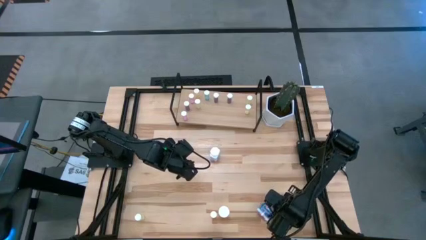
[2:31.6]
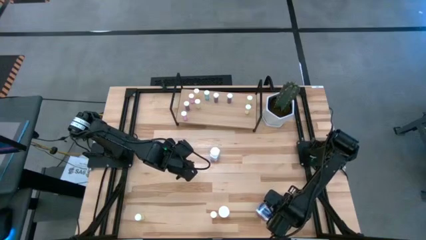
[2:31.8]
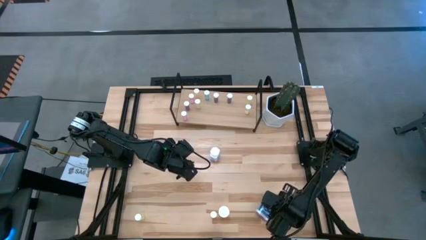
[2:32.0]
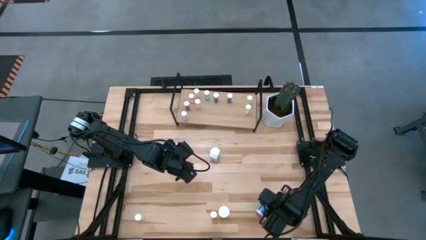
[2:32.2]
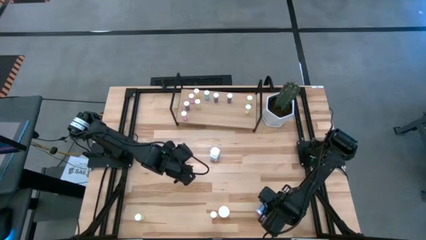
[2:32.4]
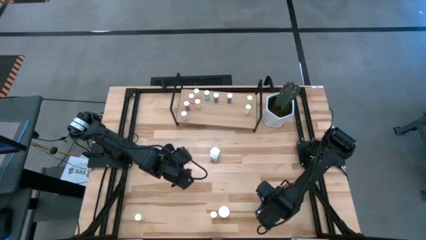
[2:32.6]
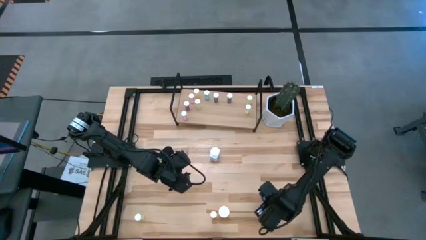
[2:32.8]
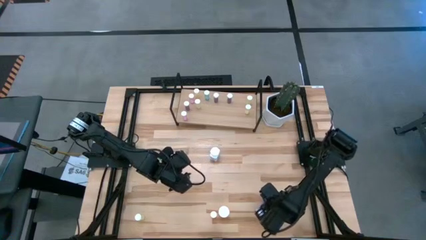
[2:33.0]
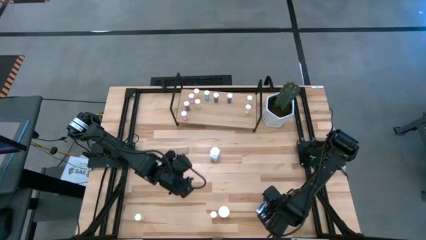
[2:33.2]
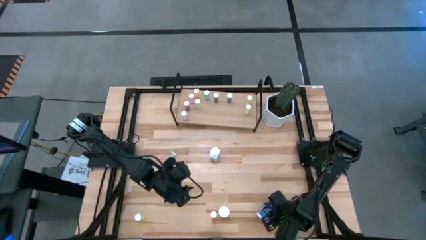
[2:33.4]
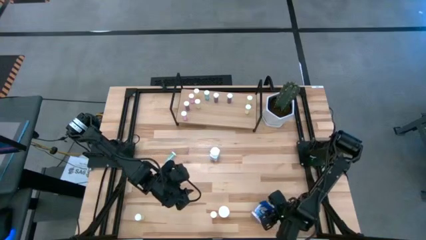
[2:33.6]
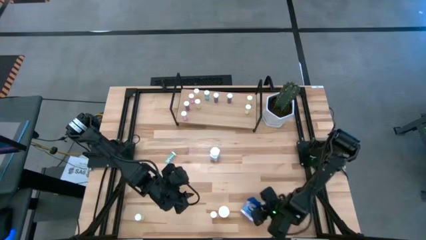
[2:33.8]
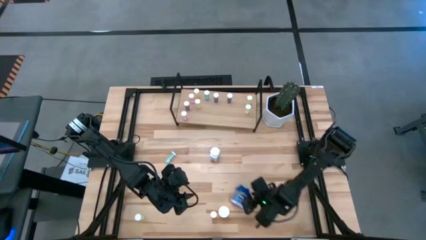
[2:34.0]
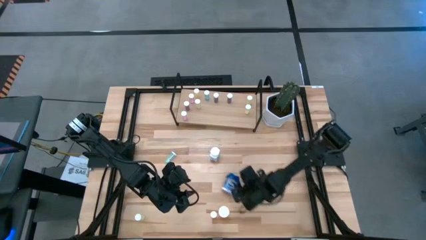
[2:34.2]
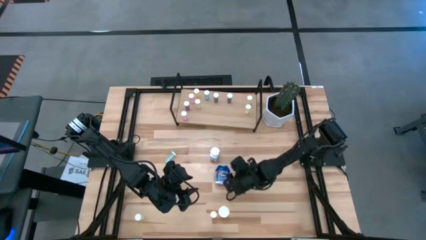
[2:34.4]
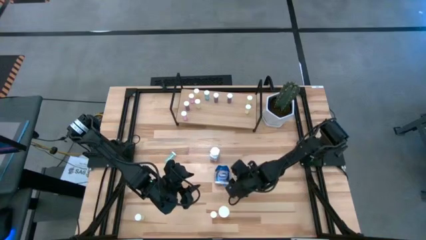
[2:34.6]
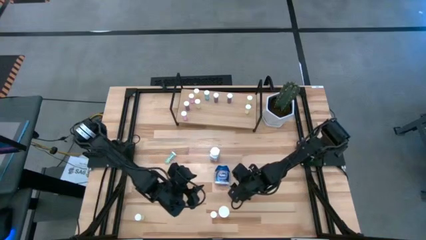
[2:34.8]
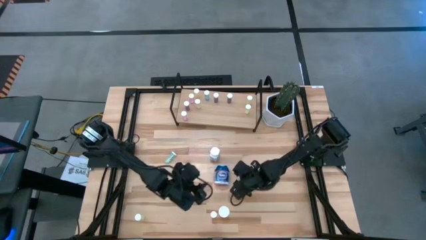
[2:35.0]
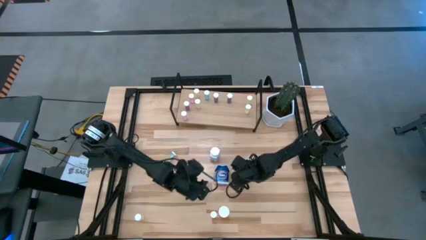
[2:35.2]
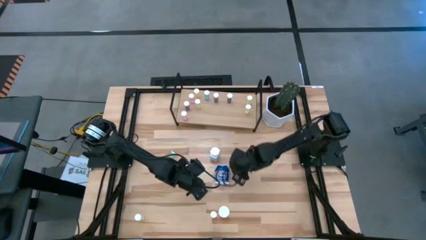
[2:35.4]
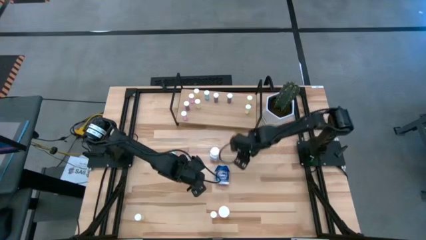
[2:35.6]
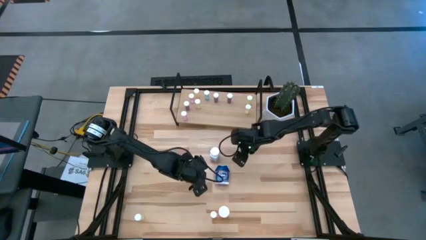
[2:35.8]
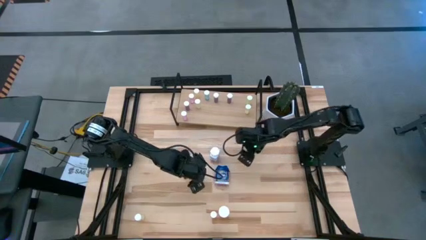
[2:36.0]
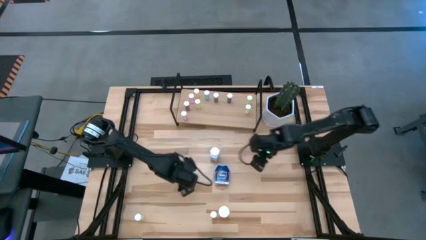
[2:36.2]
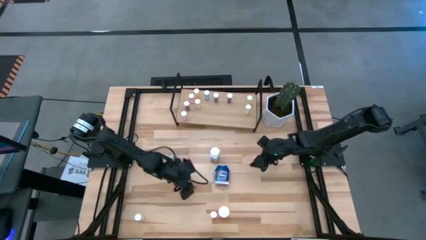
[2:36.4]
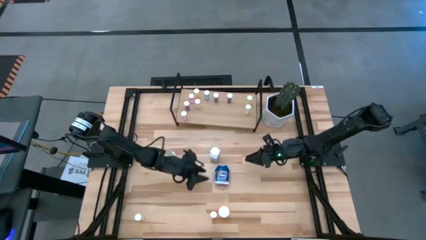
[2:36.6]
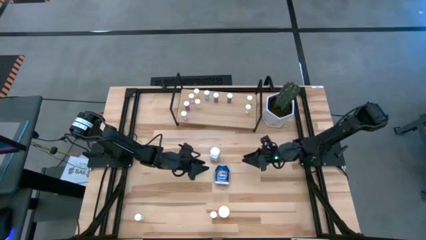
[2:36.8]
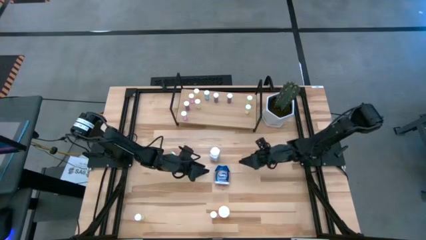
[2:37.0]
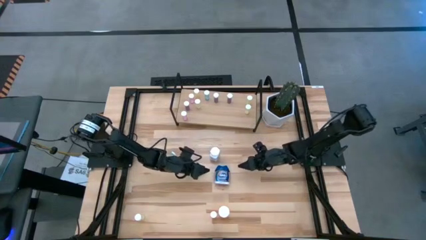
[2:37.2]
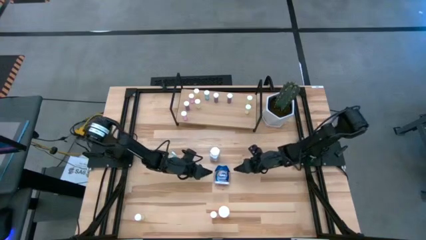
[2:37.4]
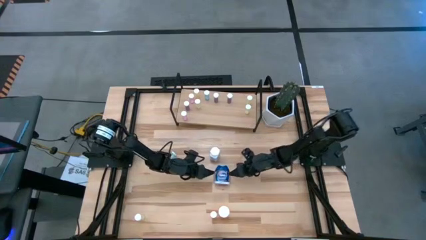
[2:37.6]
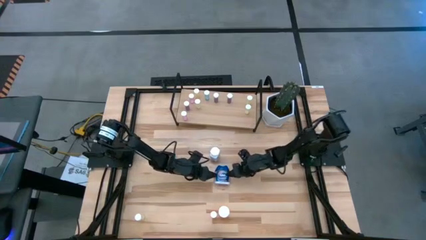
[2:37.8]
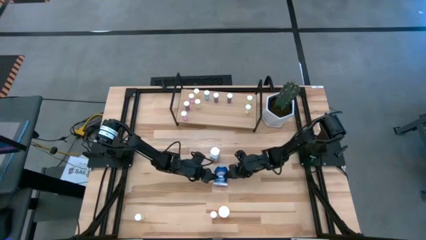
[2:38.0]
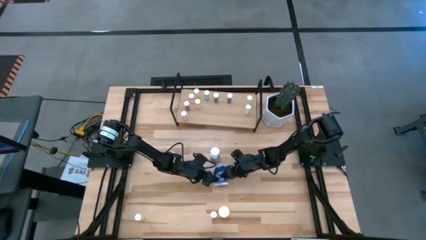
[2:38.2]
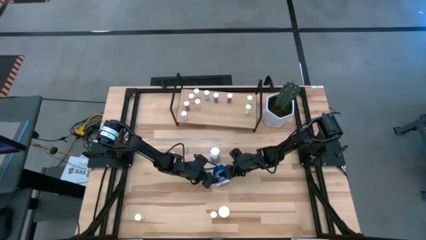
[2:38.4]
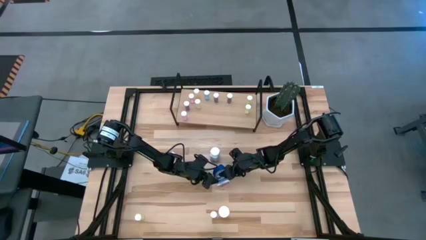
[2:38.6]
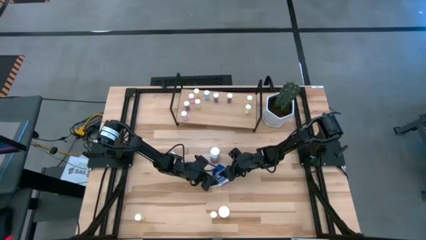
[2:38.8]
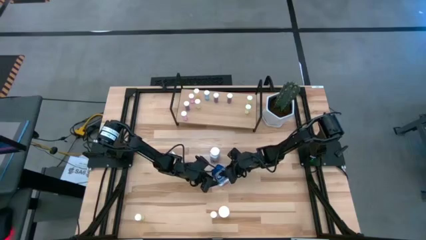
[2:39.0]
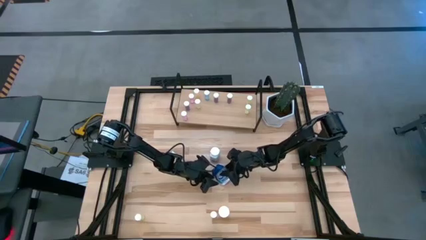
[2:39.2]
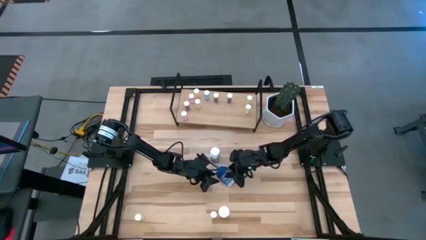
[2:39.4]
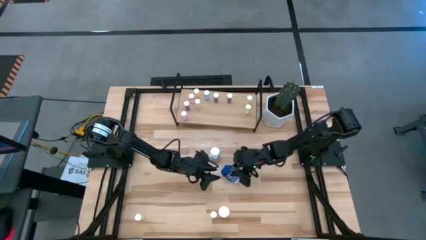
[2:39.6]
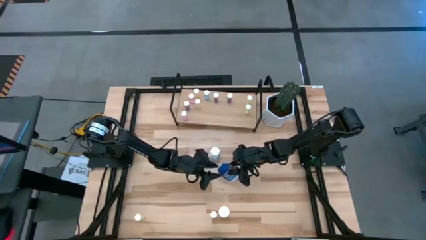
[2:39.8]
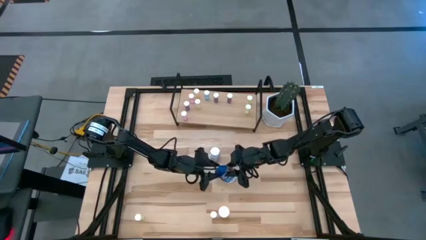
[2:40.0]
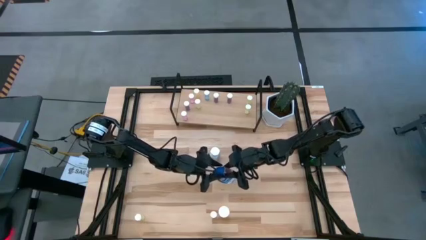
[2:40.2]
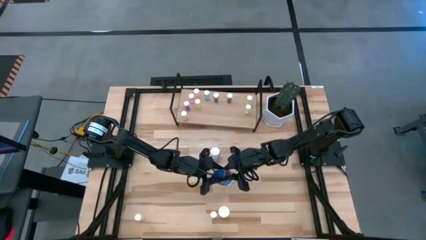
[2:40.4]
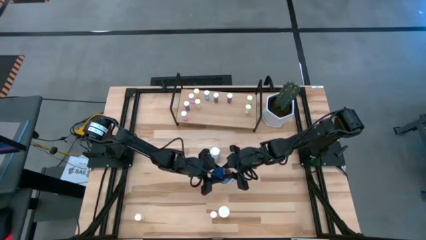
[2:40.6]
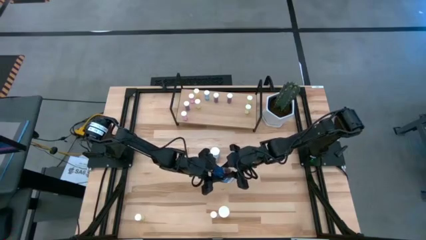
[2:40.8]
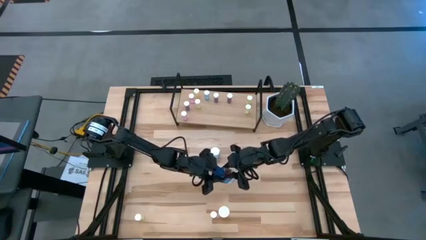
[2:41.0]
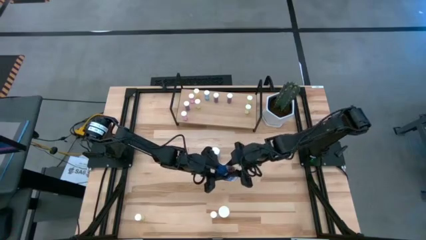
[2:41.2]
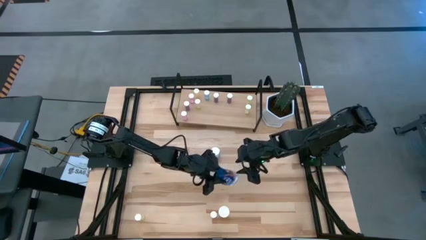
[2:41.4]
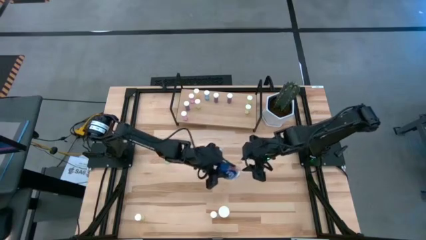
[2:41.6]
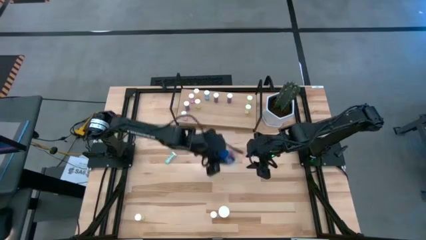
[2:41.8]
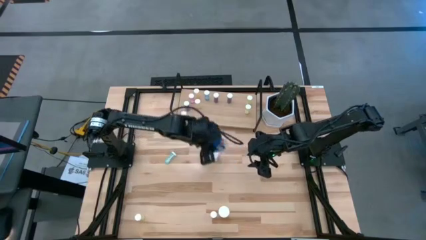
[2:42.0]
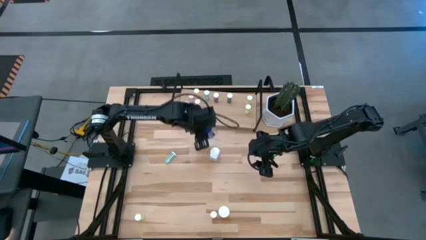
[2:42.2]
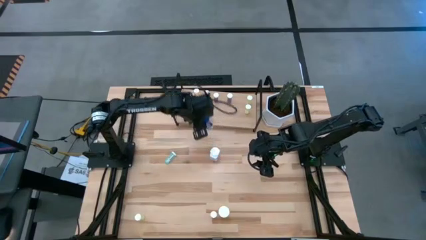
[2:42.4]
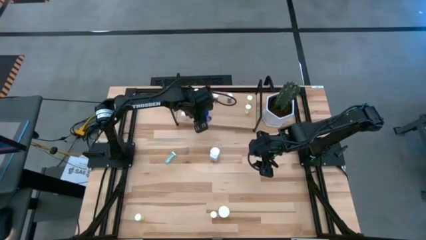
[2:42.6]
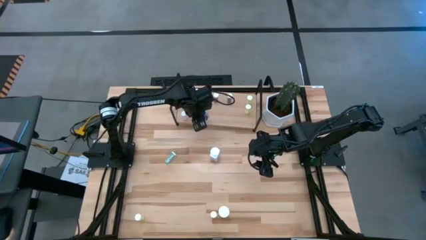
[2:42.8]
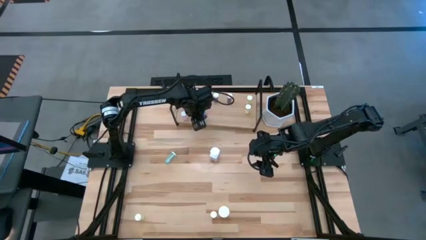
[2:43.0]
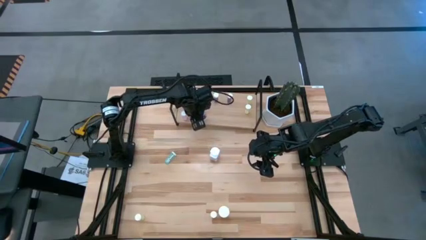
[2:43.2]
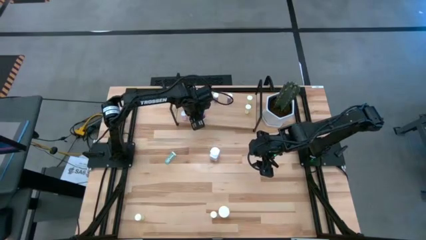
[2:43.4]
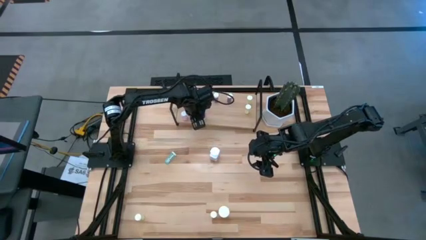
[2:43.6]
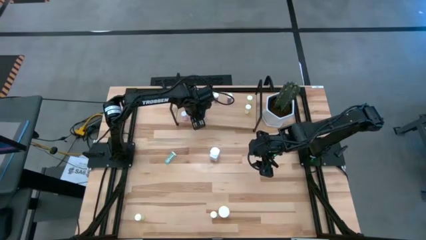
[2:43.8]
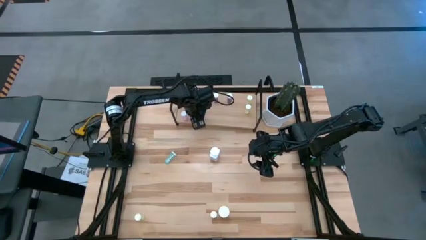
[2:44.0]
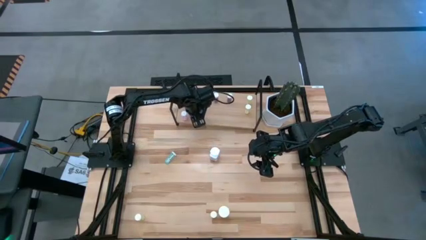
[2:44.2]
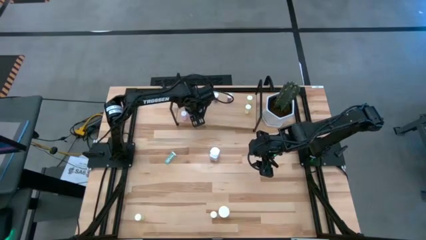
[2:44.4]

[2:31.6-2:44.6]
Task: Pick and place medicine bottles onto shelf by color
Put the dark blue pill bottle on the shelf
